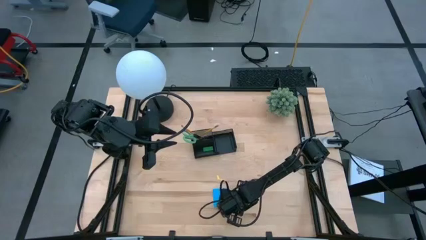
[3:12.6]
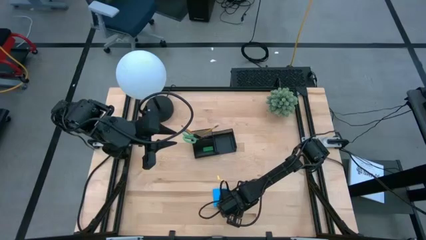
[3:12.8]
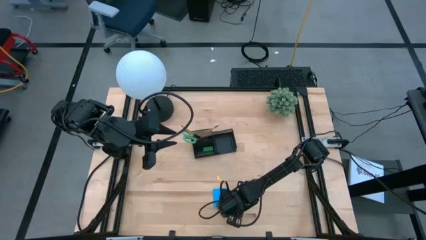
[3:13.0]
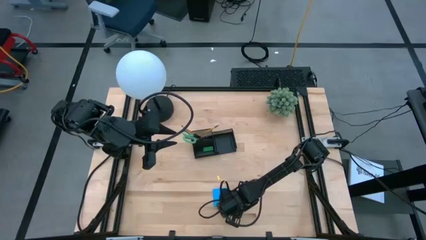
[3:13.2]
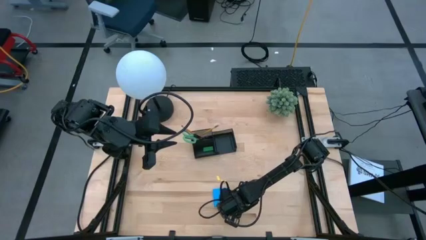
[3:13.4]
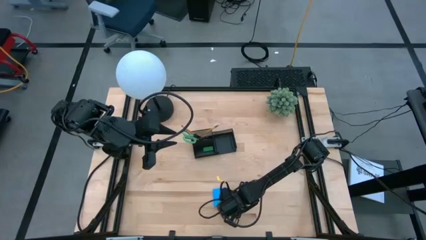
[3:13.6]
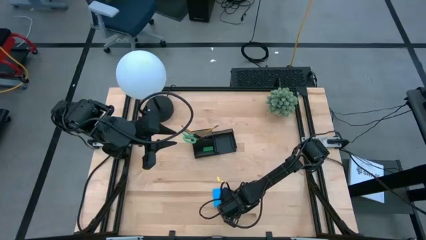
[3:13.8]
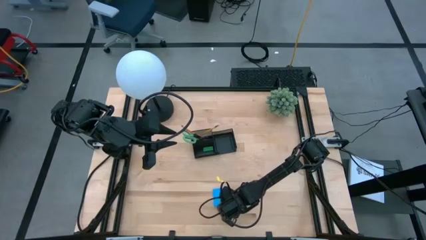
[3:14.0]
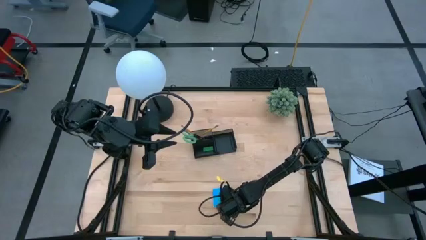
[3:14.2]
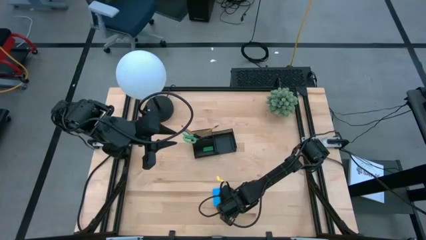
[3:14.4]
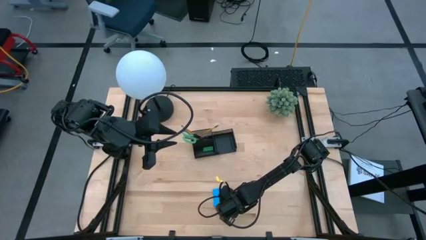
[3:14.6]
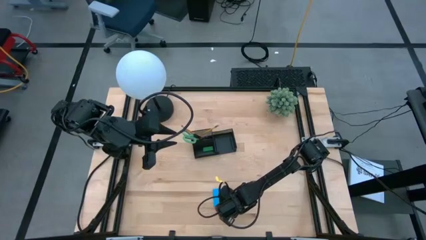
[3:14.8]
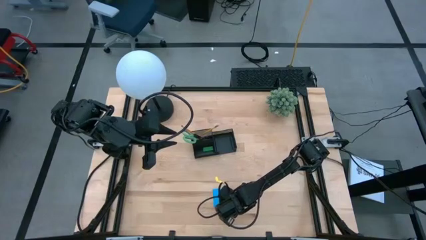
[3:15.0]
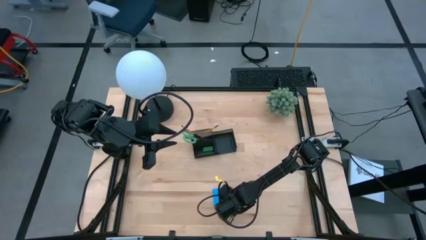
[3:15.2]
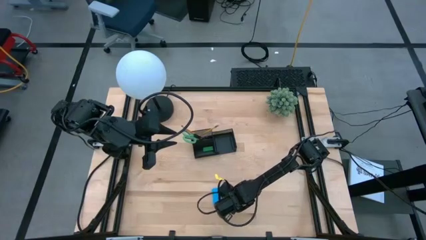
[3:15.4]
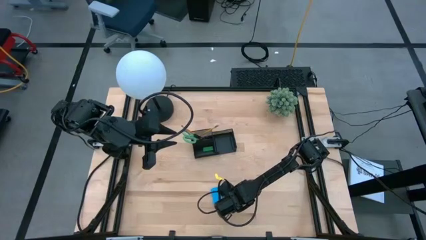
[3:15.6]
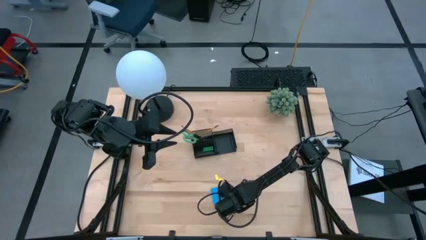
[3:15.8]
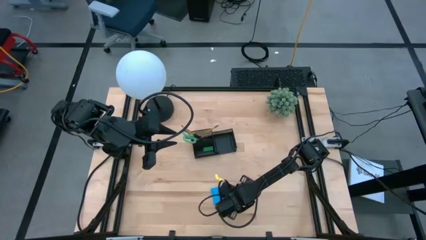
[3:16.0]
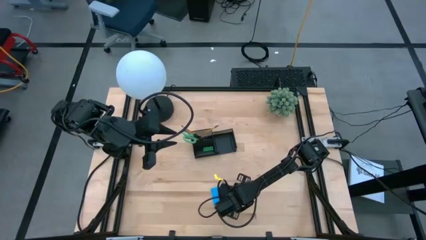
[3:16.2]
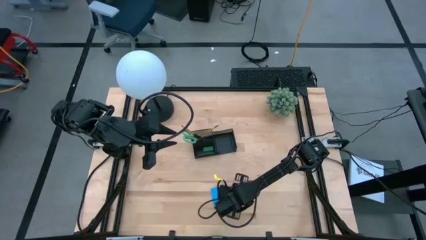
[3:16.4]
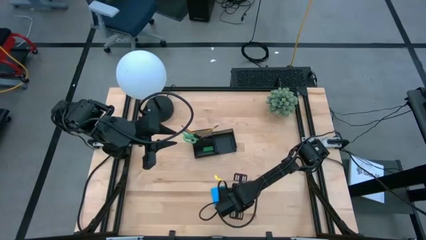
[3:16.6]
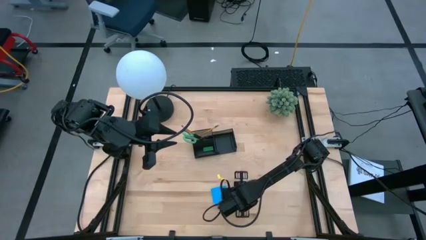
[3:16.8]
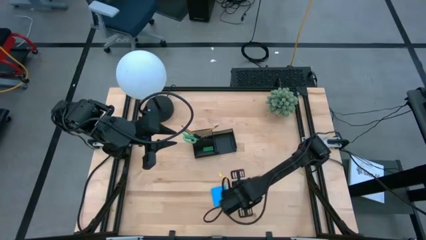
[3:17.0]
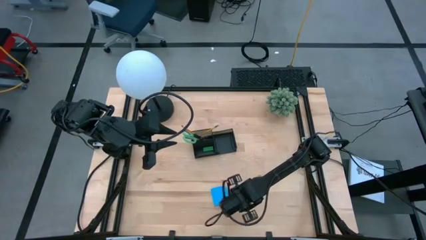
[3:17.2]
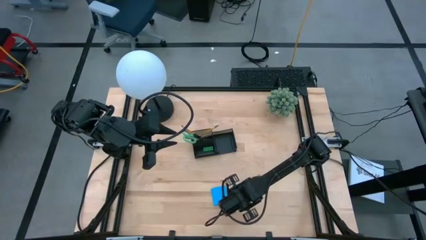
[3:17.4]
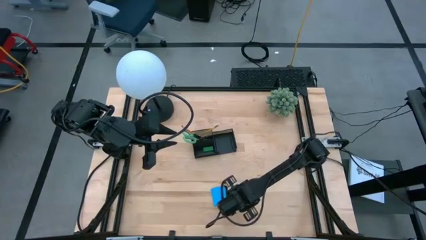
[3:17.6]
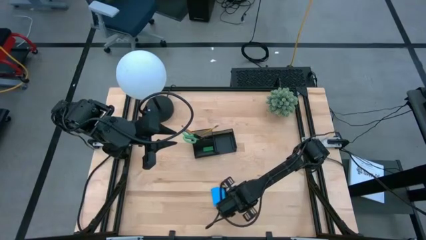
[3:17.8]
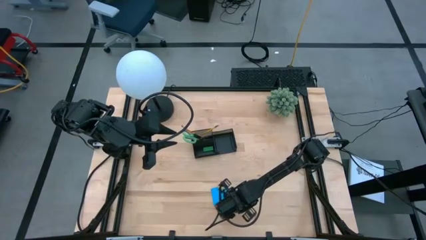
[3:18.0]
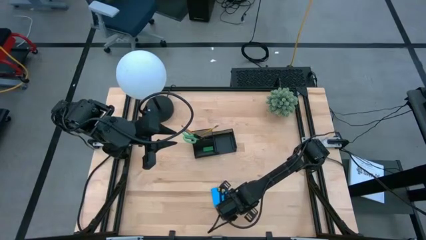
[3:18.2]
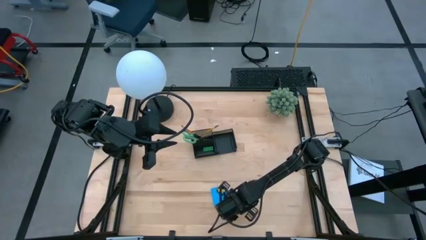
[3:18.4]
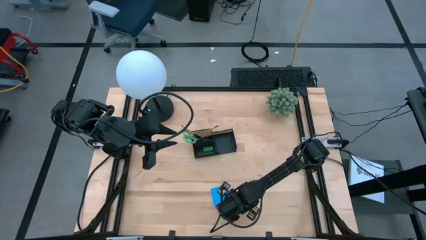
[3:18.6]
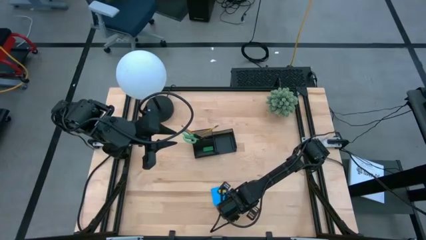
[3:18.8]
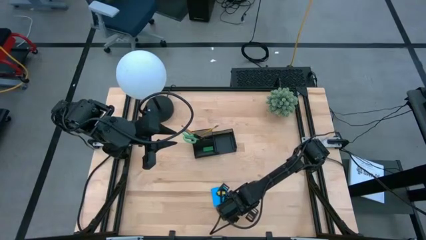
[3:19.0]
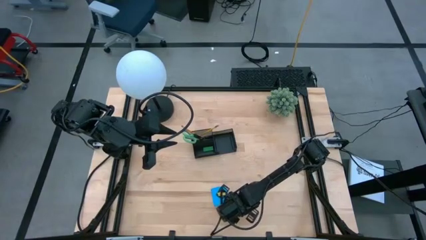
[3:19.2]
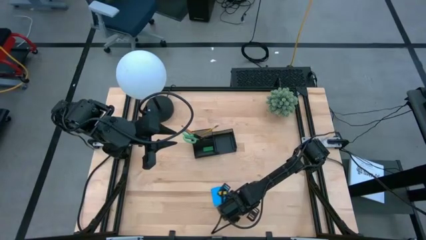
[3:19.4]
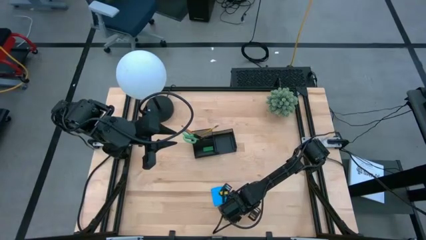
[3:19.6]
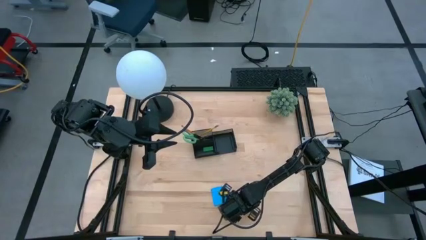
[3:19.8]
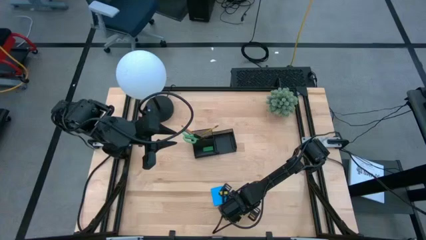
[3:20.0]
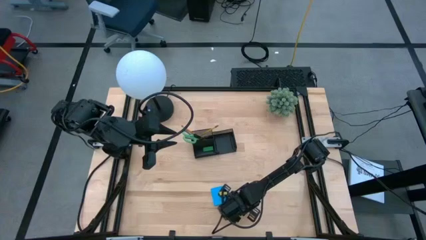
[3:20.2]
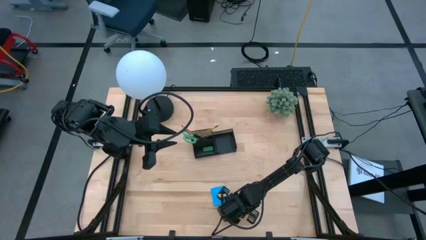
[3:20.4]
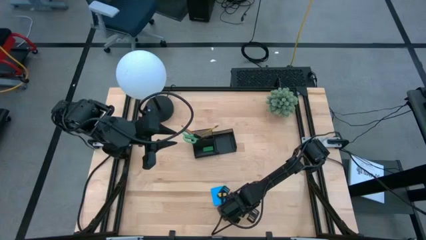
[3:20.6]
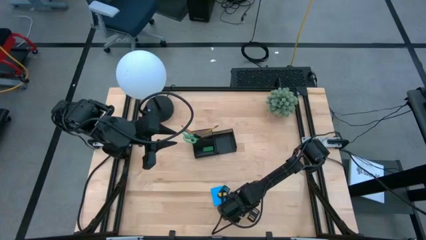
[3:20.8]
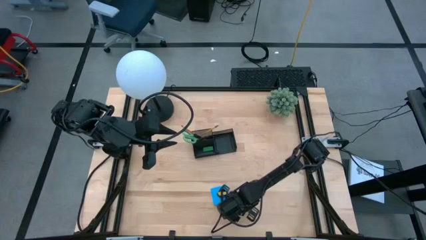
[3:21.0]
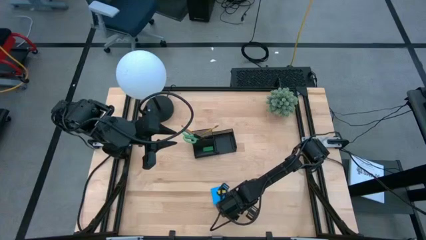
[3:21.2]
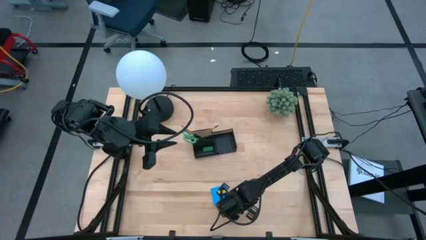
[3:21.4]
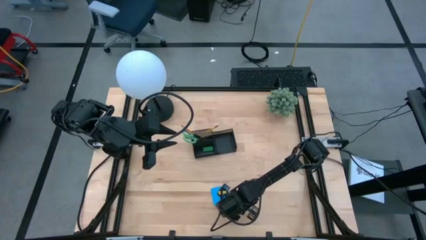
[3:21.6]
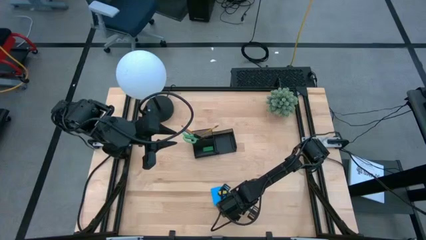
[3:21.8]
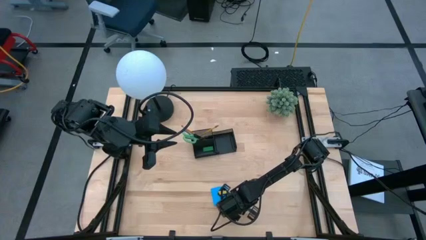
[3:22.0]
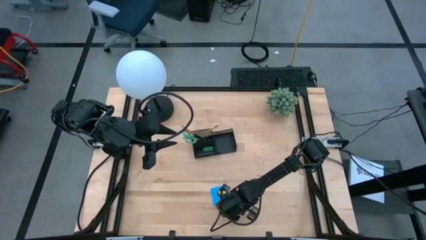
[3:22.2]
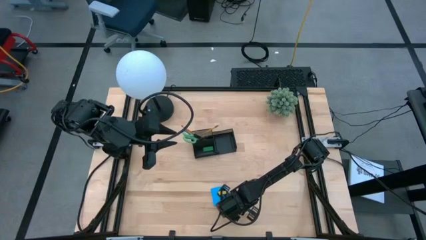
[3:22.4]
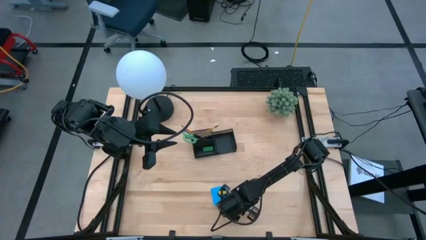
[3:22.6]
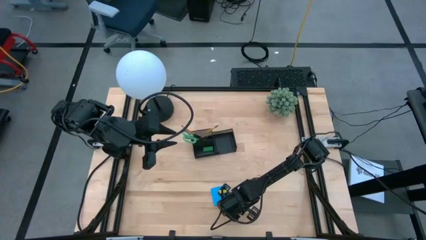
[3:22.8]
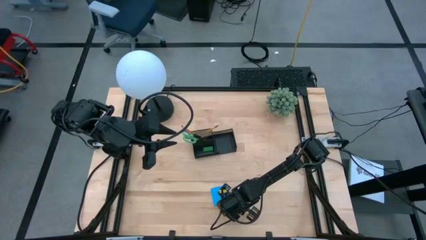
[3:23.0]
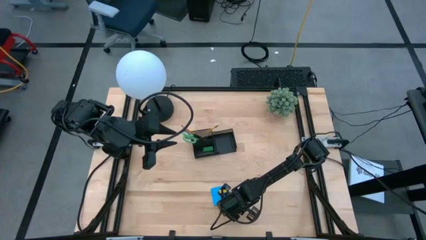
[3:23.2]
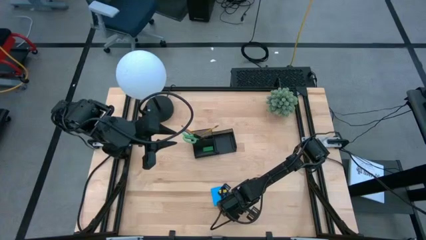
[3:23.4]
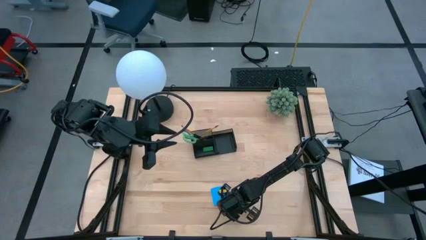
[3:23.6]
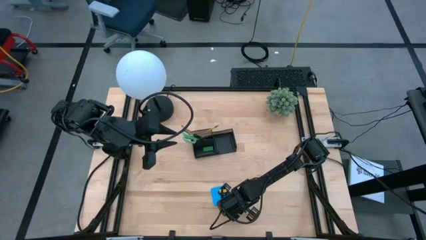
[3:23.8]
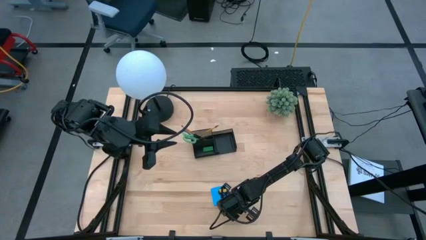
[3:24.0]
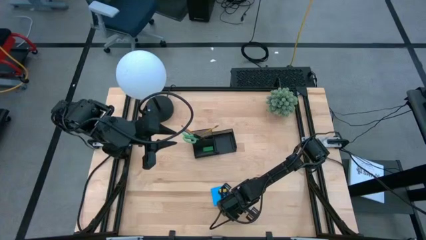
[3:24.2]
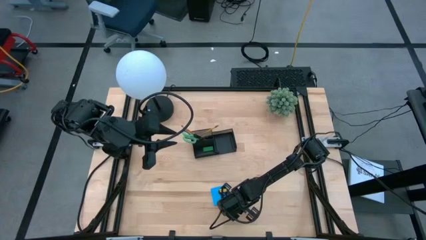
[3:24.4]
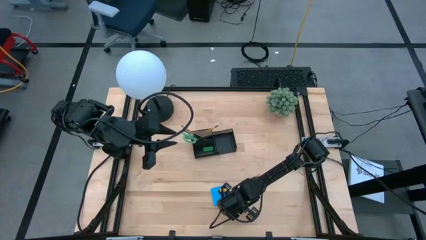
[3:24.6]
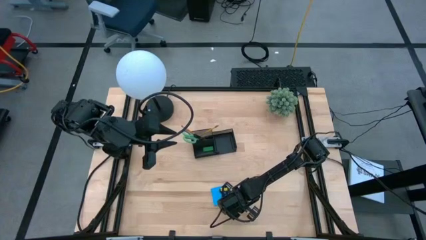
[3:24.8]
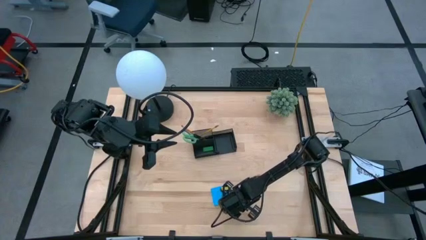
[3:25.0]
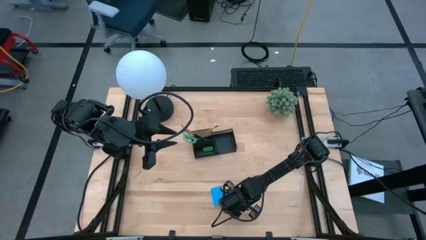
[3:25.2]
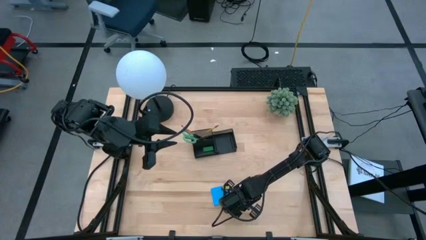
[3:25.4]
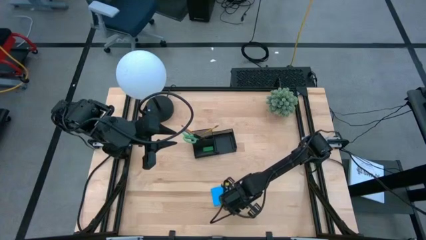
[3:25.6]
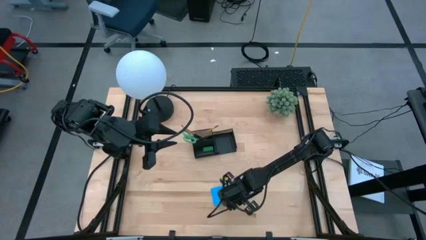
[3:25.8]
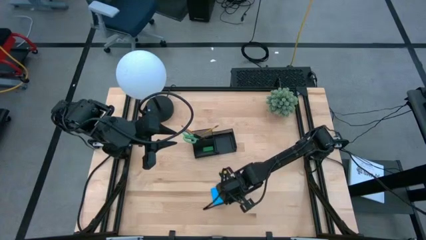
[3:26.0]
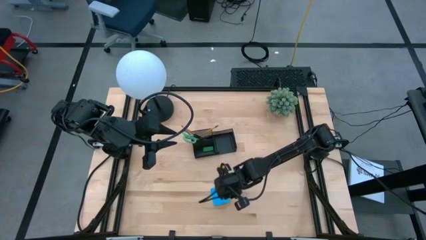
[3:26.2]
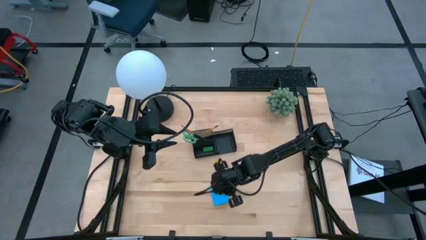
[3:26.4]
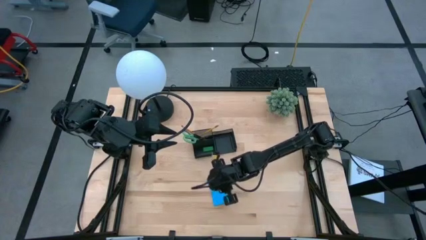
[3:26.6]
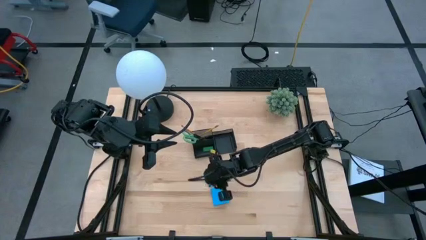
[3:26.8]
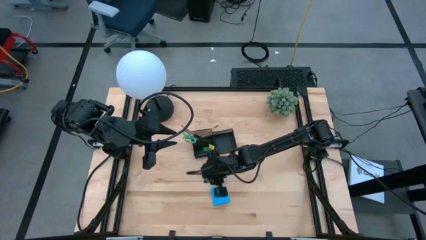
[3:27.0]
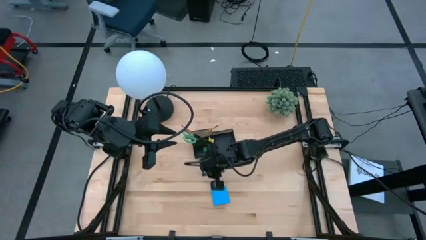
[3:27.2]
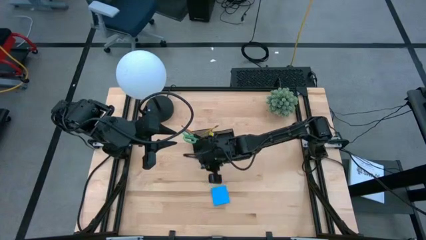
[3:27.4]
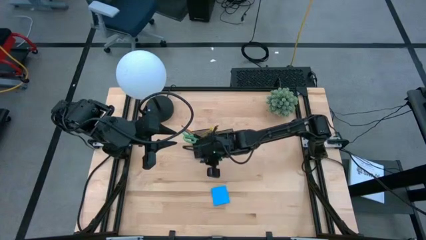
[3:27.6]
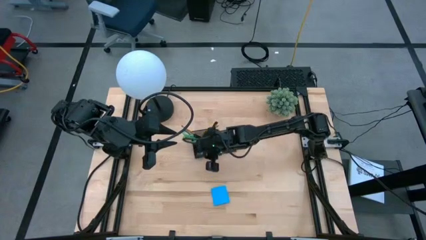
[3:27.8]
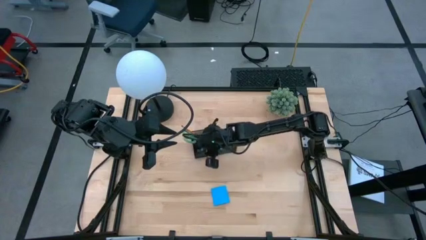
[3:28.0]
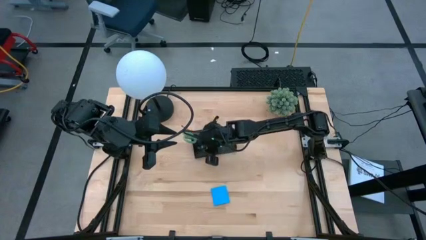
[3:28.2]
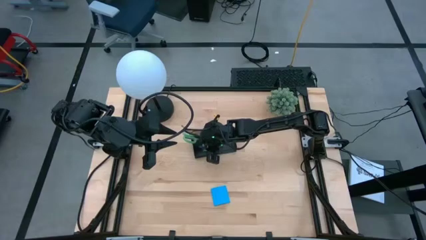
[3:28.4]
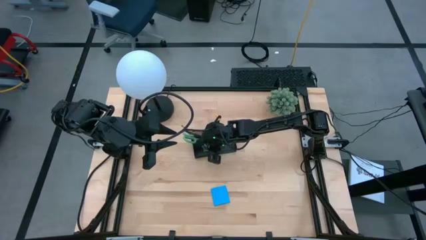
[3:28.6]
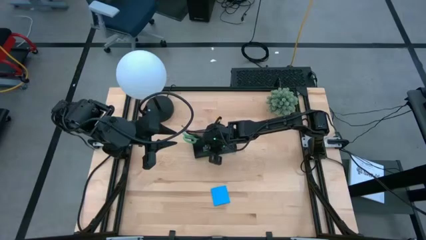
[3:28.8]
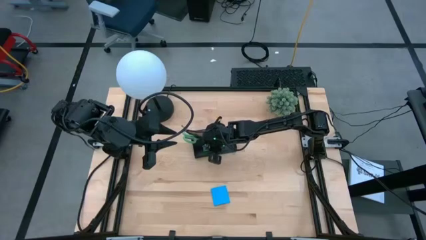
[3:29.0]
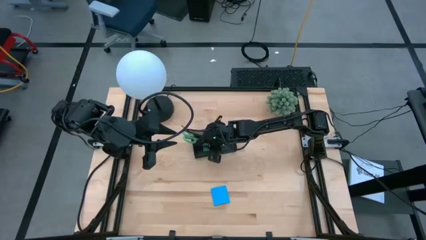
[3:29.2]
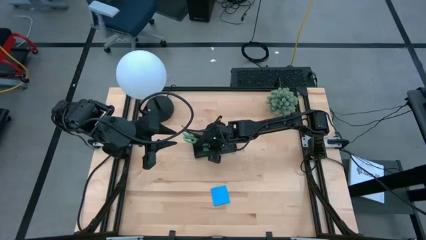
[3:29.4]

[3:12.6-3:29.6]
Task: Pick and place office supplies into organizer
Put the blue binder clip into the black desk organizer
